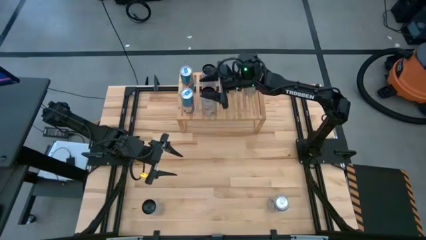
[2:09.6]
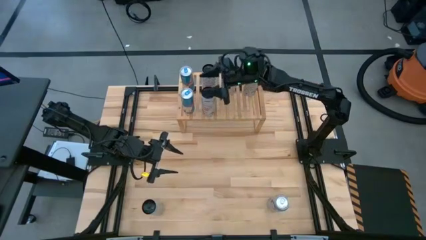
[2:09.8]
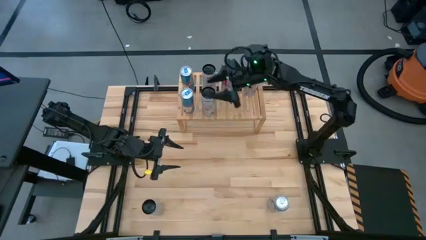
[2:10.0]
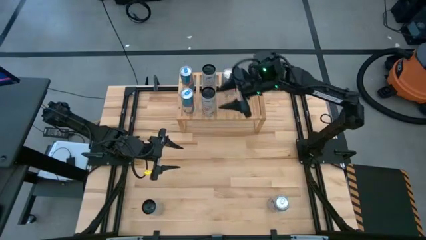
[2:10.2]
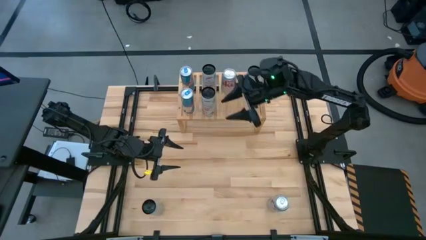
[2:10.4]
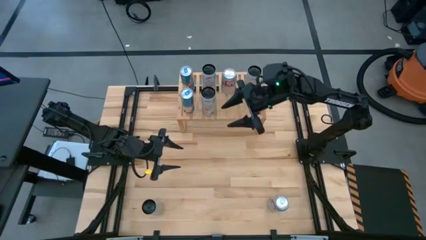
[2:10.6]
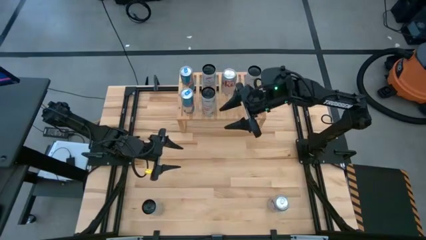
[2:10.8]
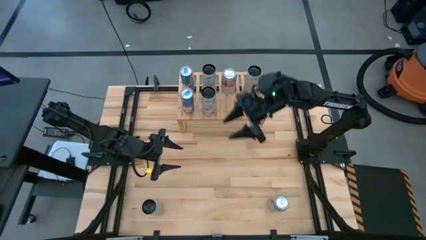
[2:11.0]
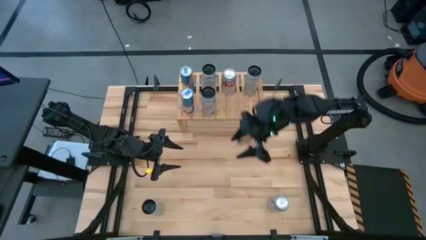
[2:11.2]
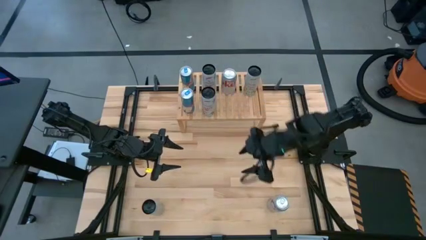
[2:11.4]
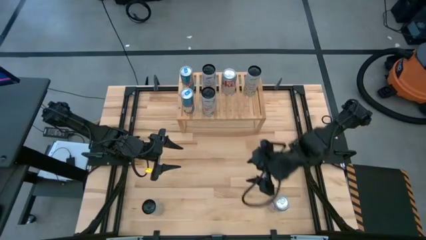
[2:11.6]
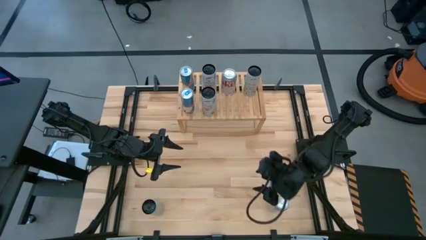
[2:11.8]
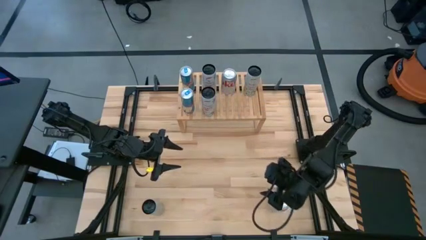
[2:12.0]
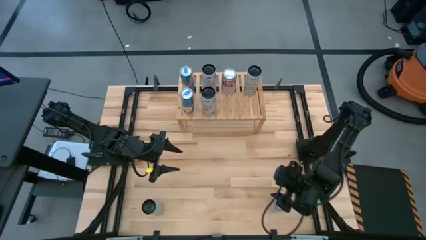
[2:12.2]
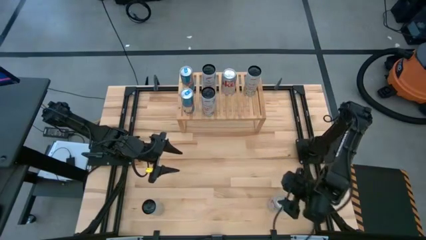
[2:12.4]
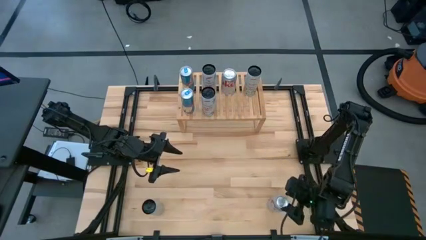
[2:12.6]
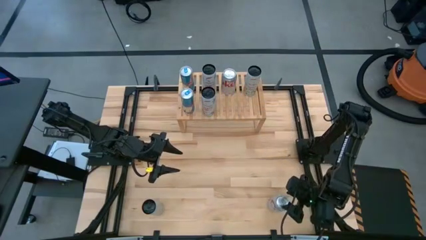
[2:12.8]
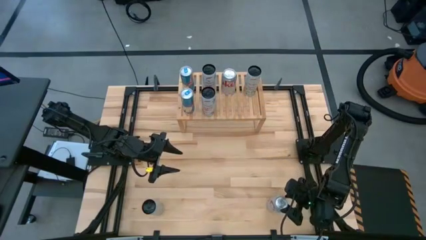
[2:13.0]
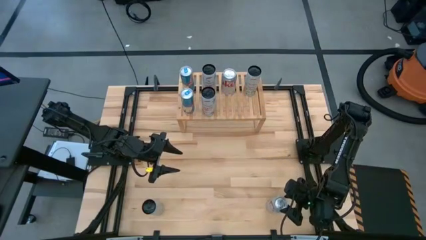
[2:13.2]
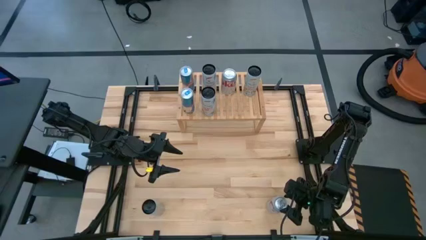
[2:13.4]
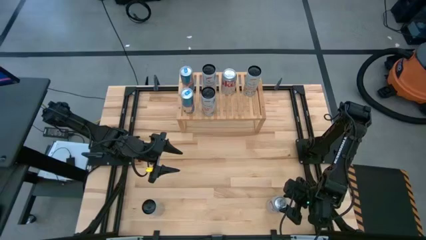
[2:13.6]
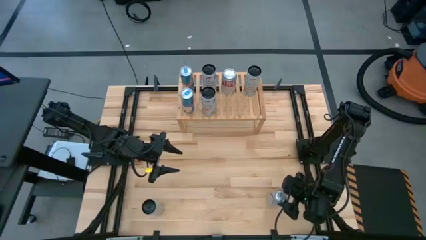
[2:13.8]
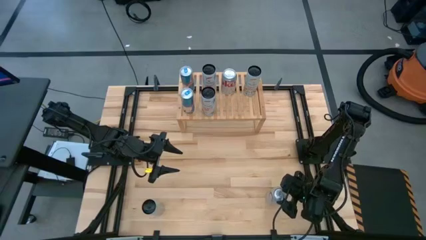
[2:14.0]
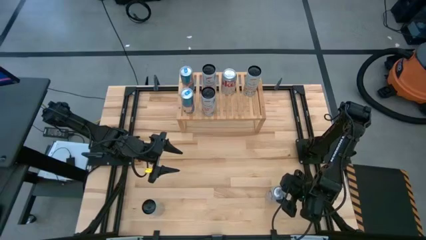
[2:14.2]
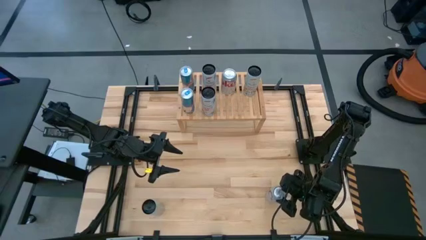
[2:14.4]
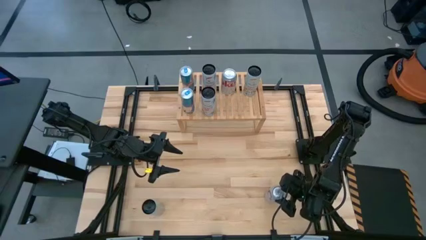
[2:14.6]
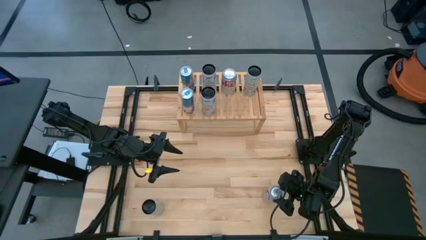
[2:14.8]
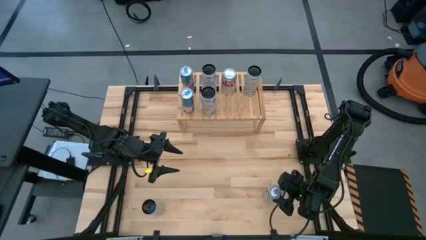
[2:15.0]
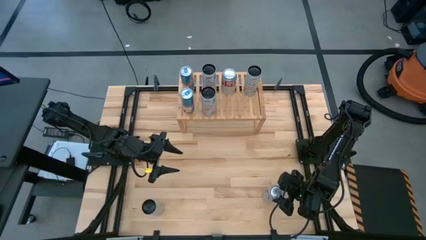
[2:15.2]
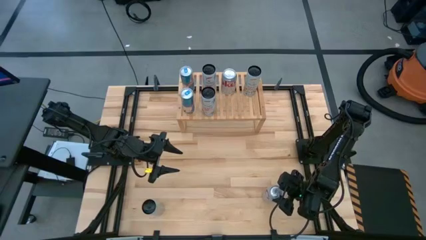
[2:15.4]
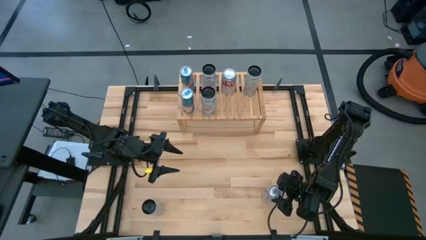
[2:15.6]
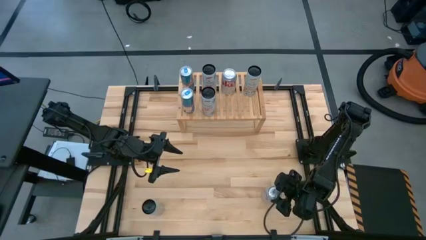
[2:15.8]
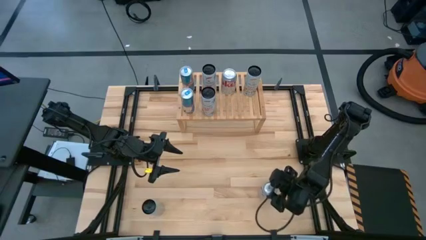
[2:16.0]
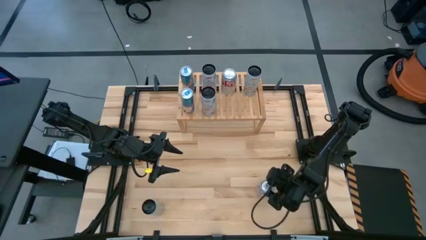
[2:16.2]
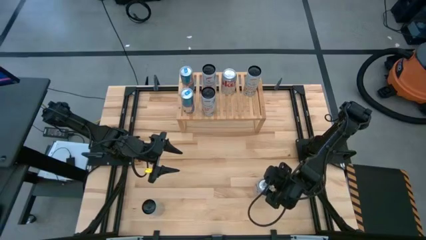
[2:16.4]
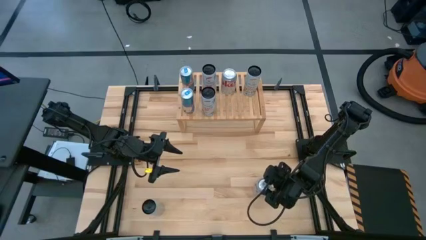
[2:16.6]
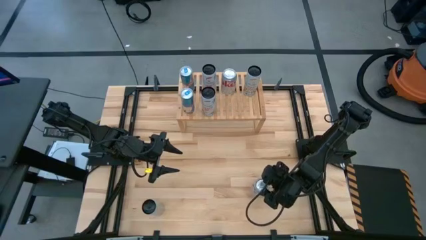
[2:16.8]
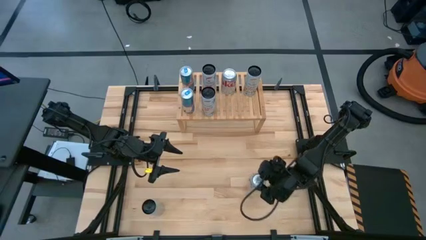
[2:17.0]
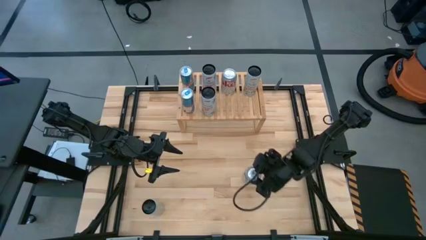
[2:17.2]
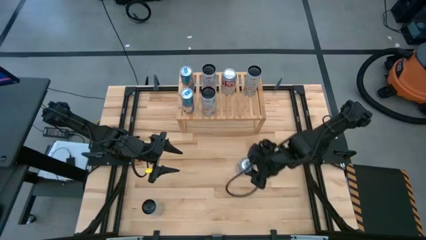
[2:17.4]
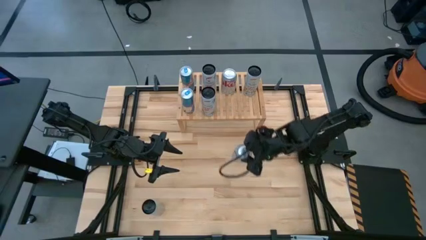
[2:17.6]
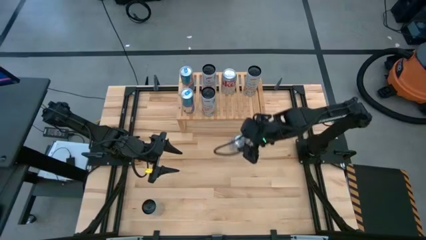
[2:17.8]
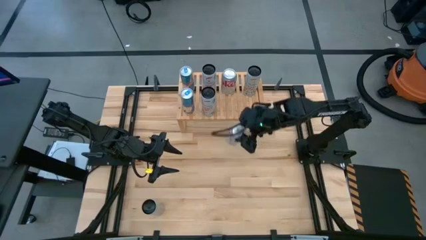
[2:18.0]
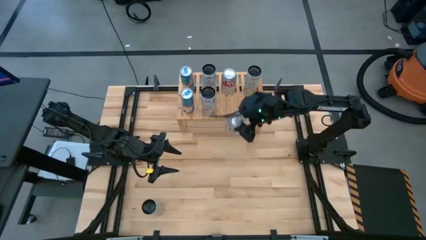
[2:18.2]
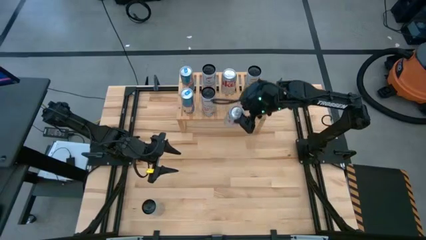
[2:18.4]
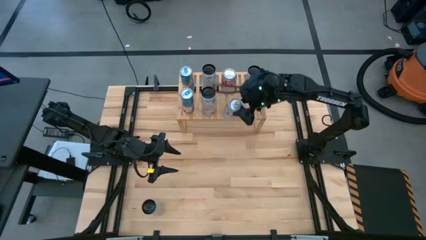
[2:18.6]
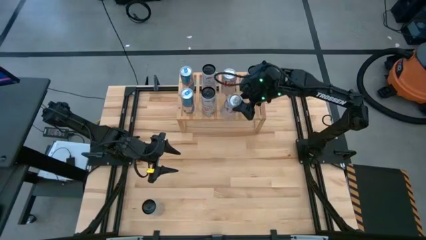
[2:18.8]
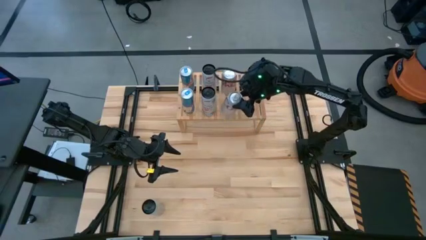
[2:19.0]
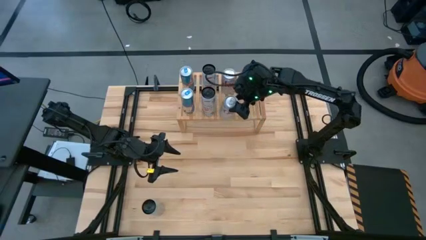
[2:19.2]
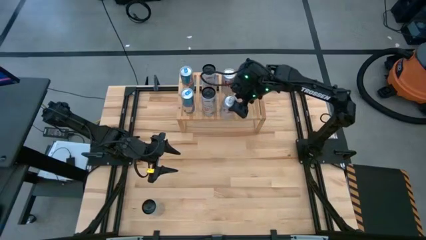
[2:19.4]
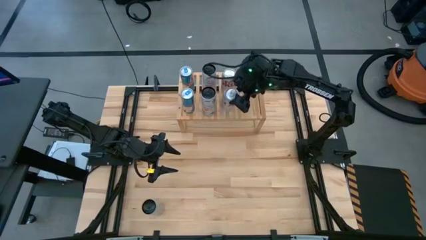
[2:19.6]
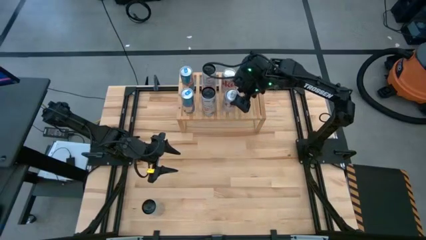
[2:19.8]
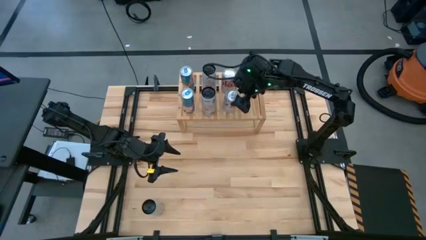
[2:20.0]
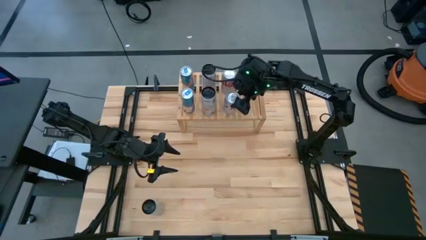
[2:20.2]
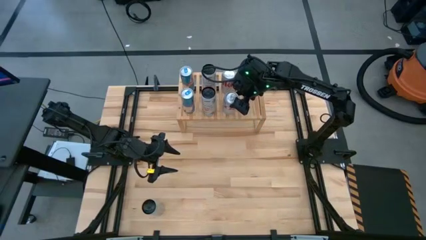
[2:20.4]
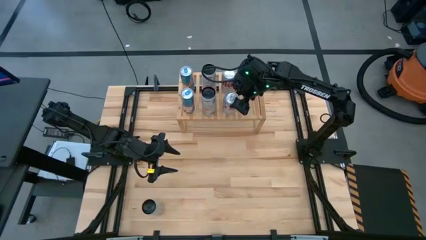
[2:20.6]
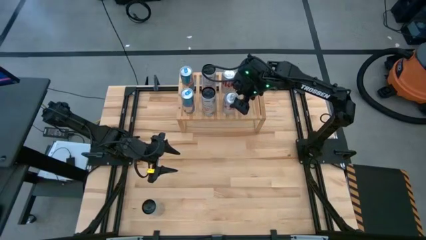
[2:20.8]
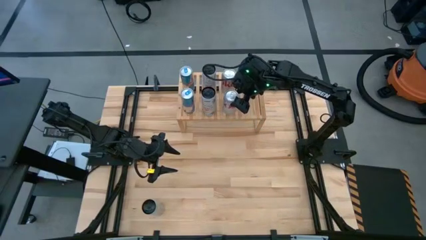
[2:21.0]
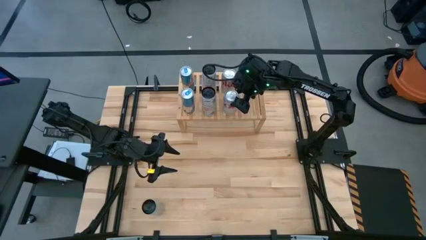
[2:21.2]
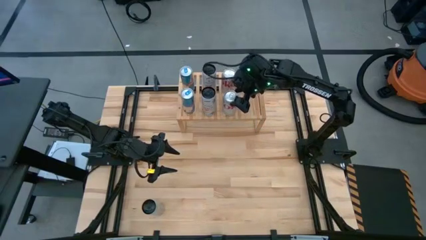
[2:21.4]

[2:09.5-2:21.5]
Task: Place canned beverage on shelf
Put the silver soda can on the shelf aligned with the silver soda can

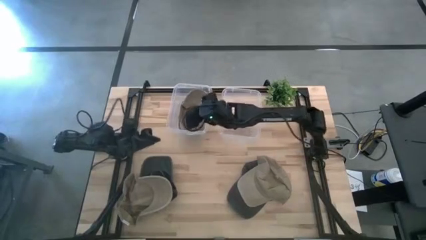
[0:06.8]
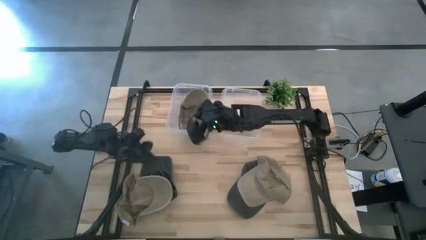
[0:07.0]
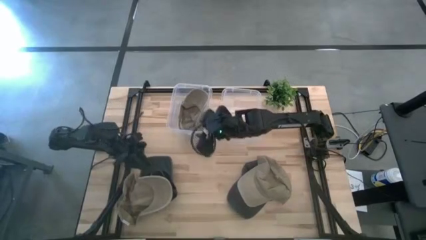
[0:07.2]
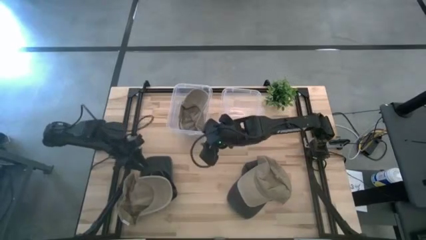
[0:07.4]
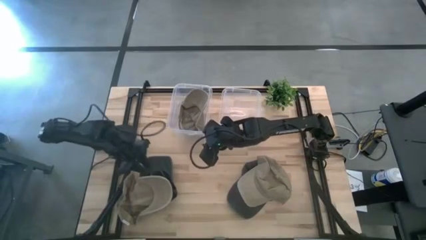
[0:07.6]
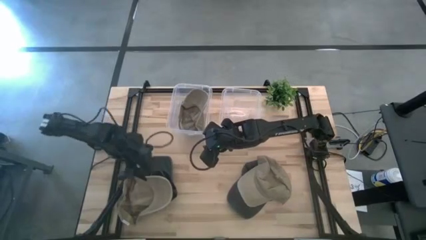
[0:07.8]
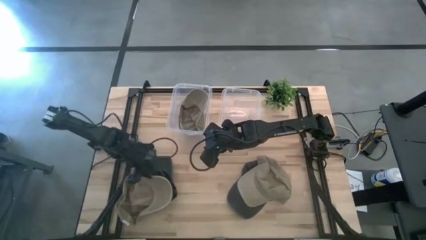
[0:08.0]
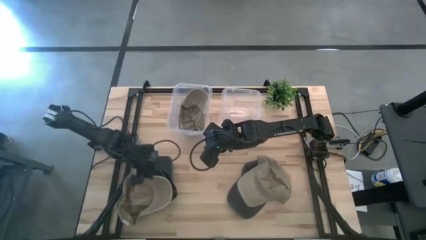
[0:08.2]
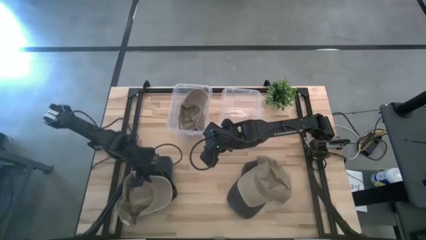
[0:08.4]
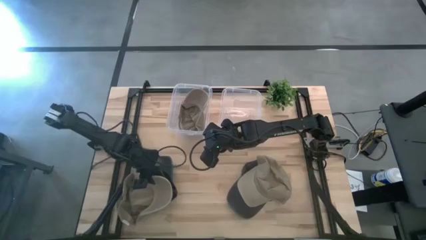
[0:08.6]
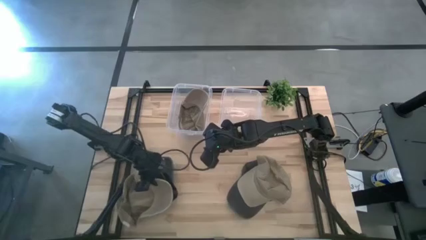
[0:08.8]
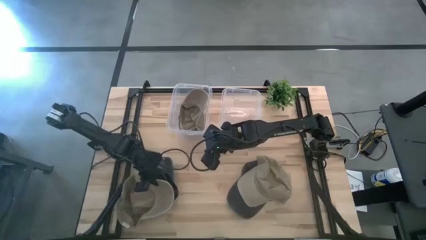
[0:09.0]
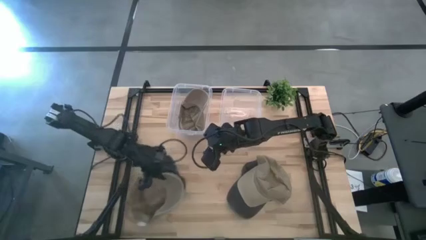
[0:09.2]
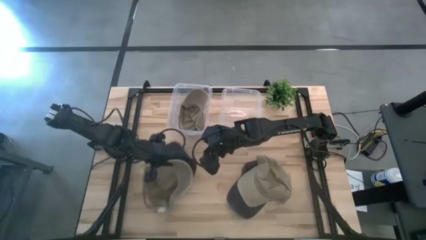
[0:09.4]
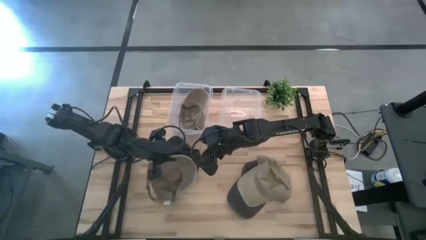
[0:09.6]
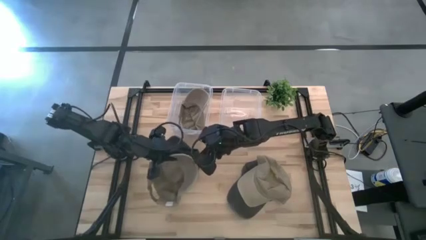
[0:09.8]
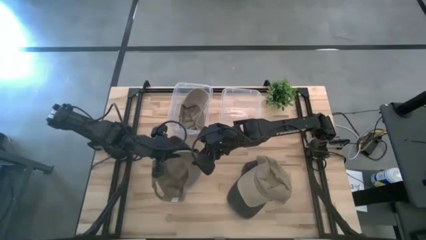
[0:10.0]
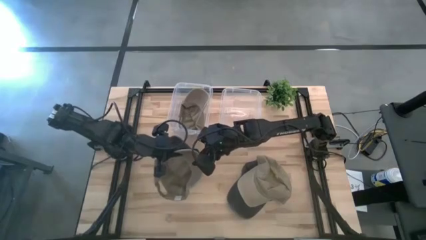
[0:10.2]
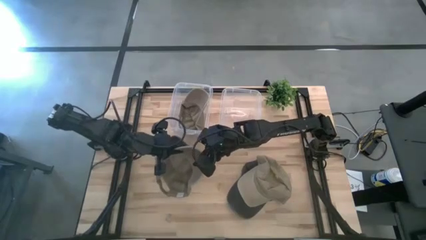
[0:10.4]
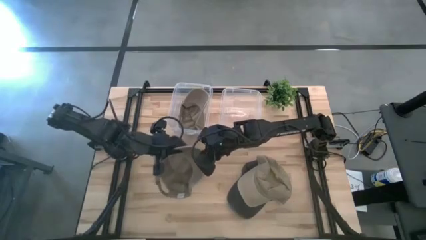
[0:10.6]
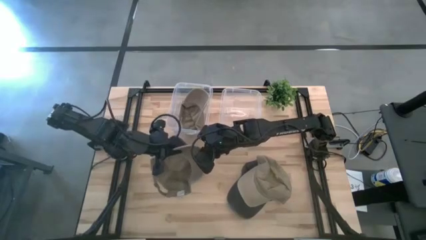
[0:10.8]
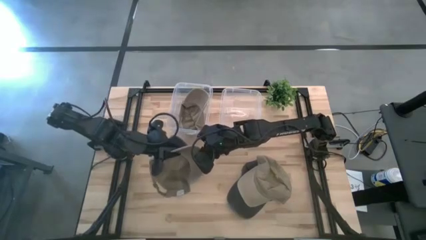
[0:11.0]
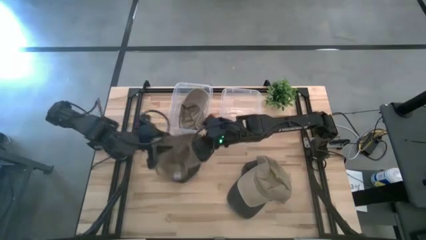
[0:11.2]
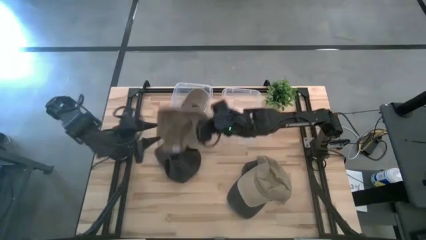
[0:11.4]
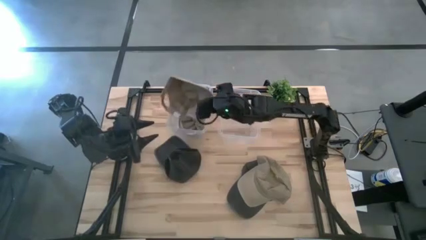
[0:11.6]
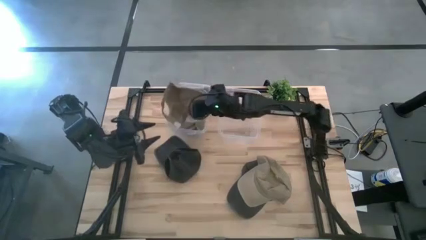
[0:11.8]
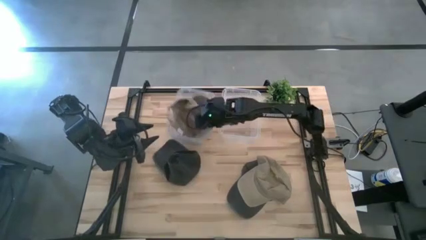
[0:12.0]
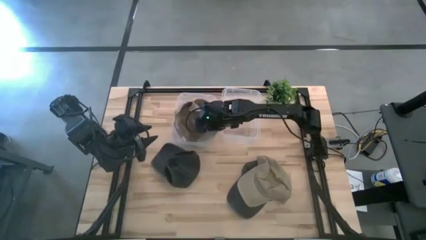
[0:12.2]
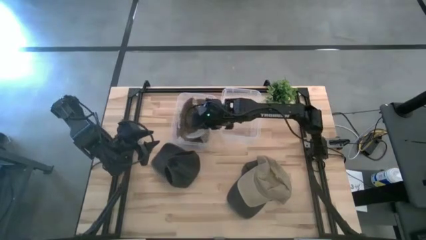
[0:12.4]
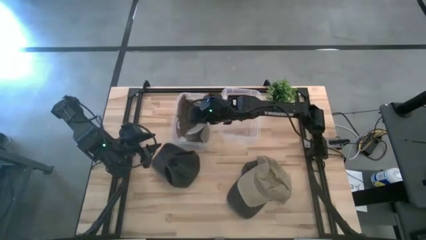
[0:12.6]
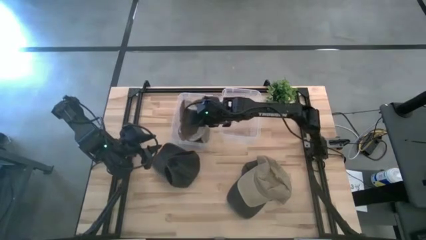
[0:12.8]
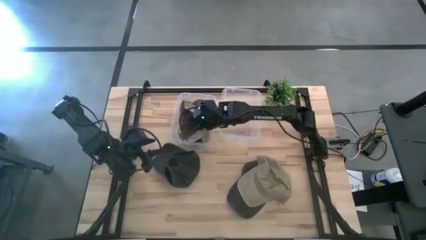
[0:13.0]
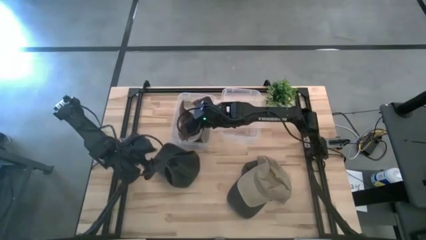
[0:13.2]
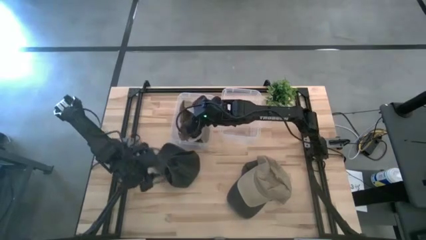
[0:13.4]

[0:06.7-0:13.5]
Task: Pick & Place hat
Put the left brown cap into the left transparent bin
